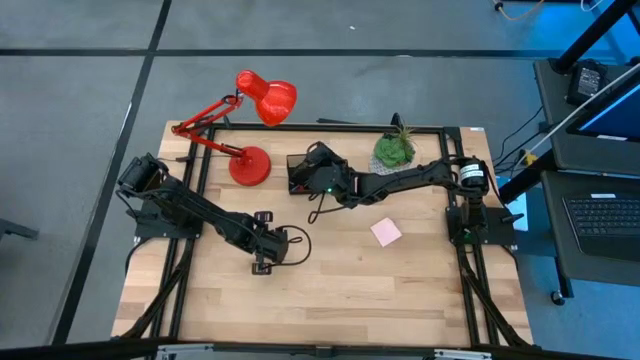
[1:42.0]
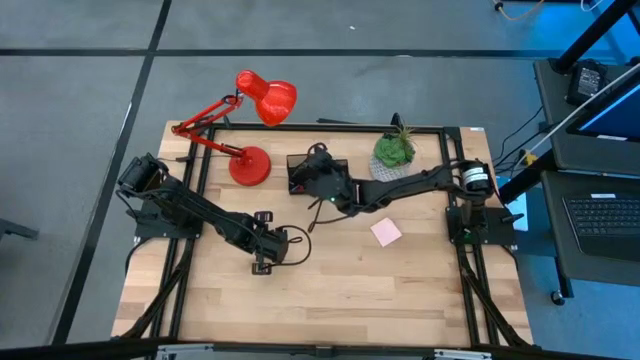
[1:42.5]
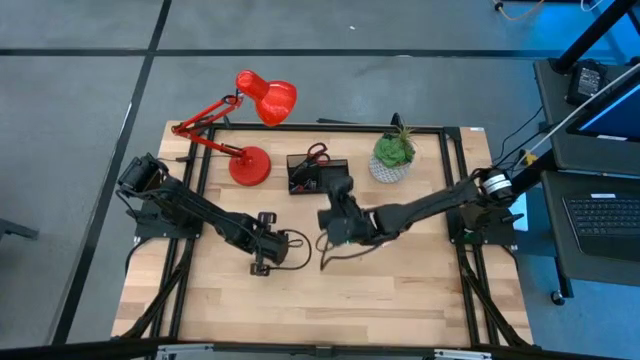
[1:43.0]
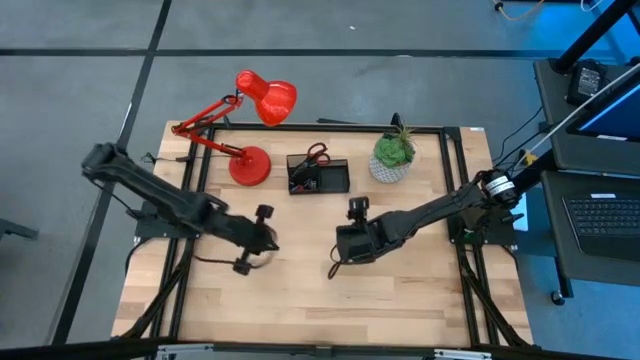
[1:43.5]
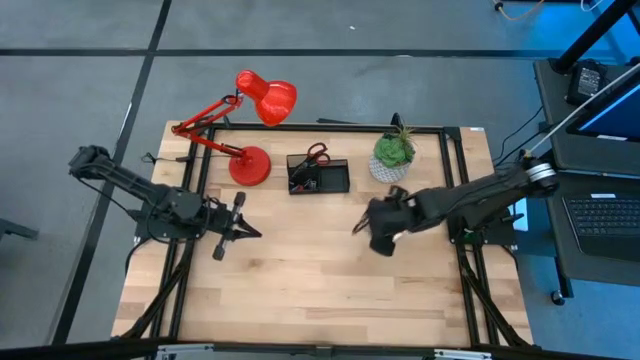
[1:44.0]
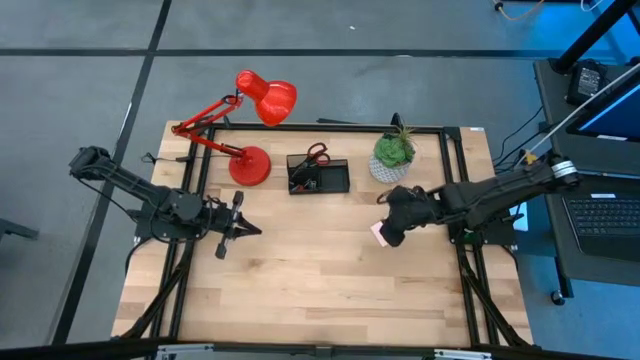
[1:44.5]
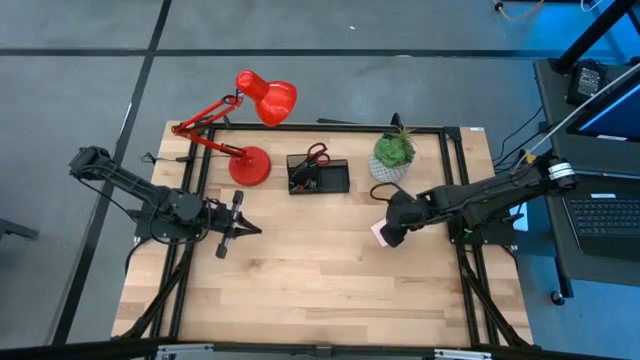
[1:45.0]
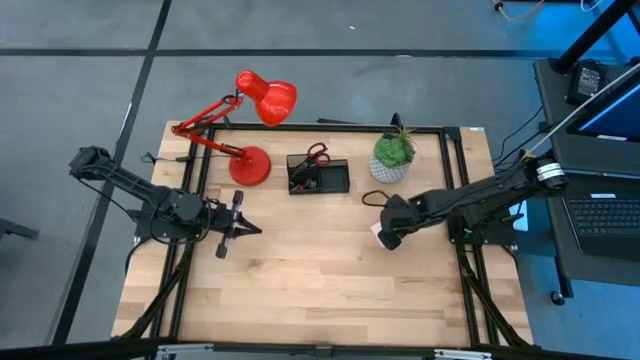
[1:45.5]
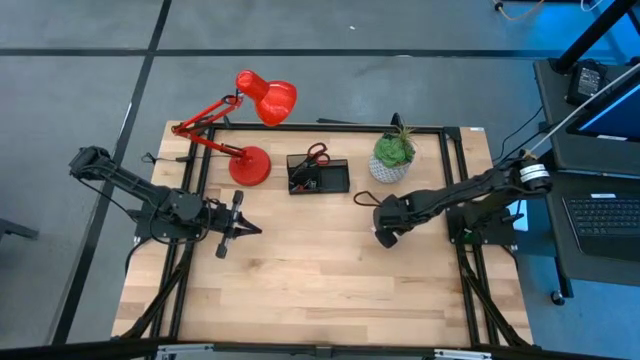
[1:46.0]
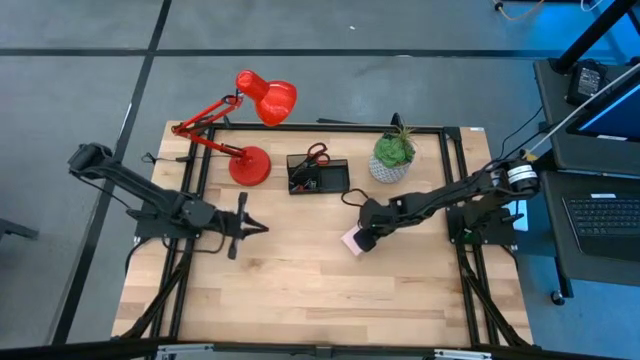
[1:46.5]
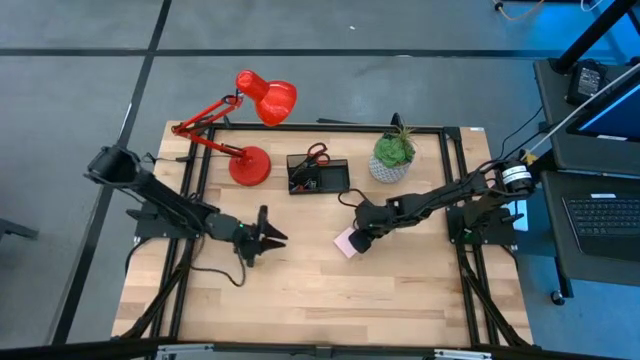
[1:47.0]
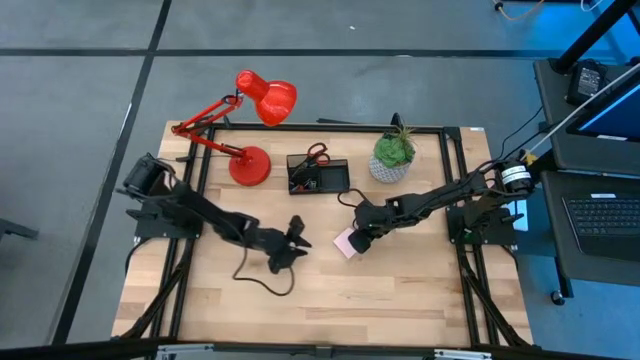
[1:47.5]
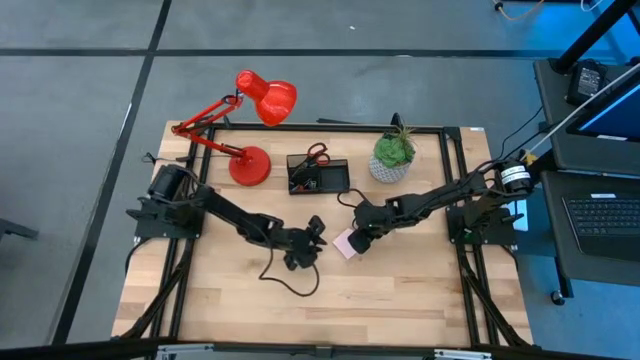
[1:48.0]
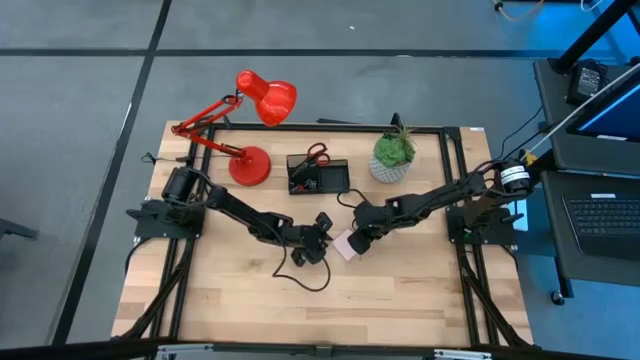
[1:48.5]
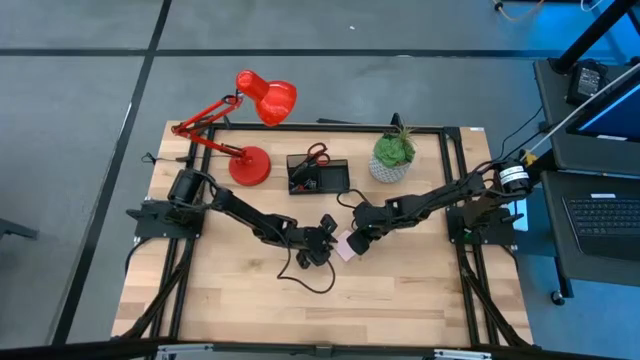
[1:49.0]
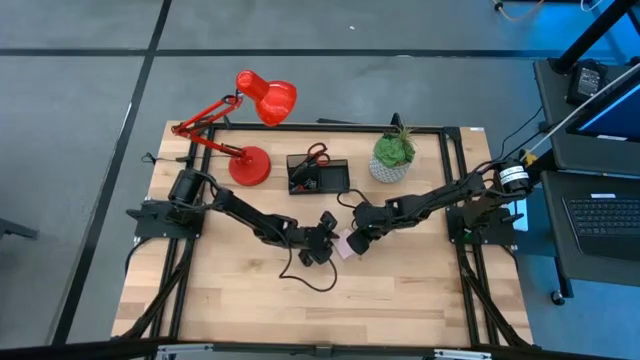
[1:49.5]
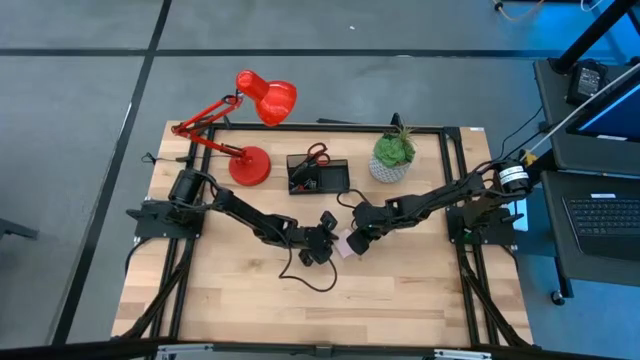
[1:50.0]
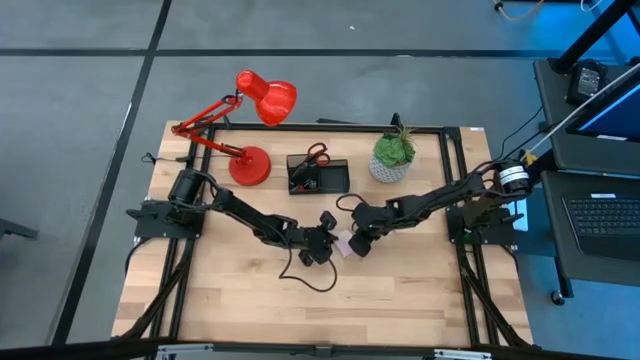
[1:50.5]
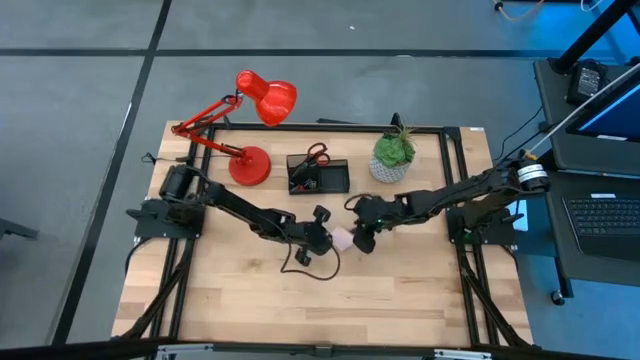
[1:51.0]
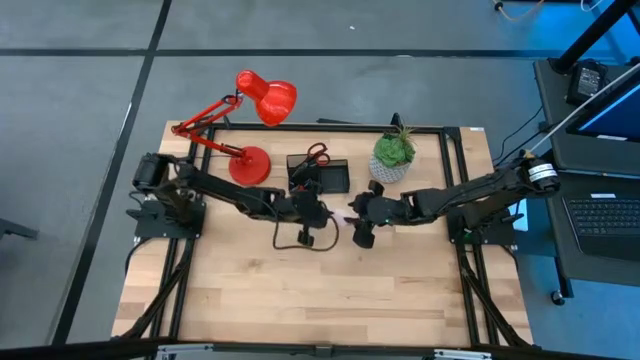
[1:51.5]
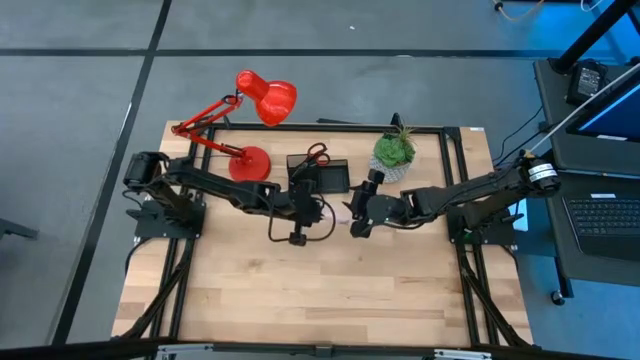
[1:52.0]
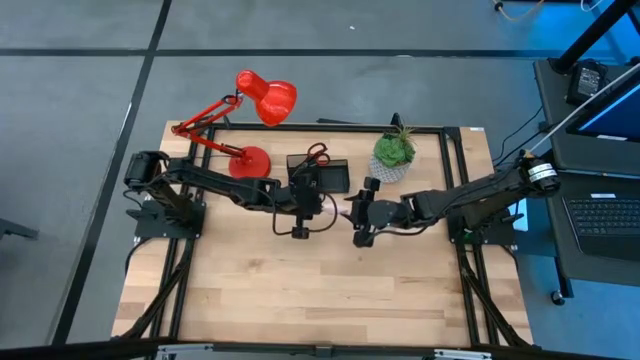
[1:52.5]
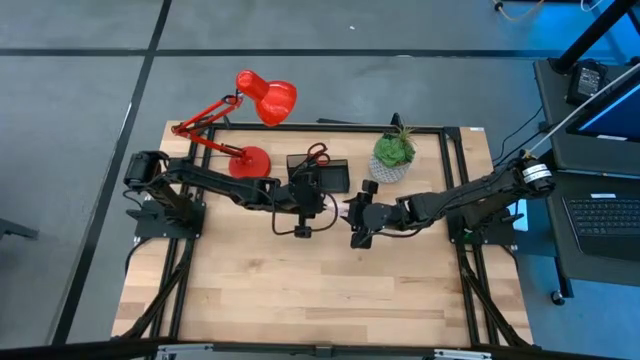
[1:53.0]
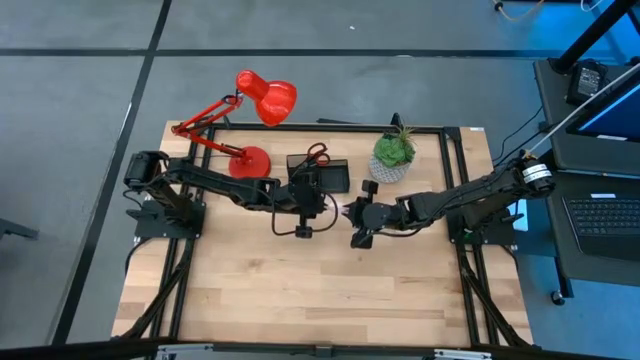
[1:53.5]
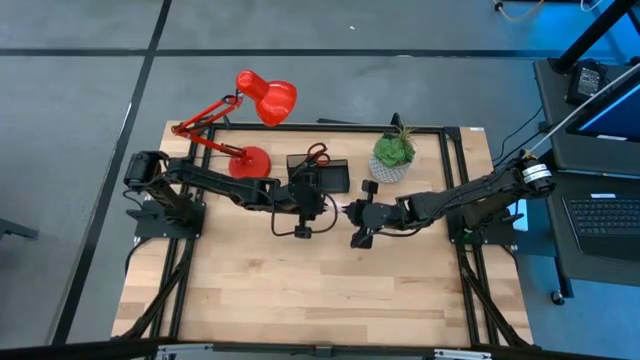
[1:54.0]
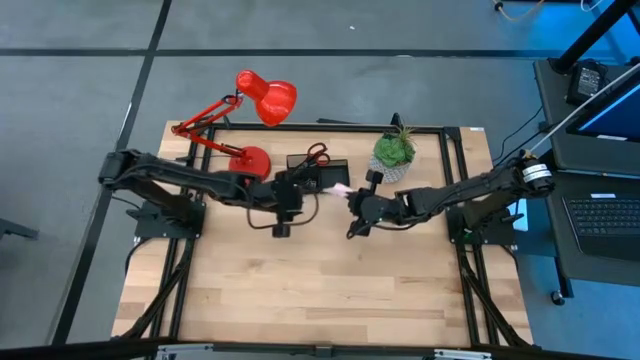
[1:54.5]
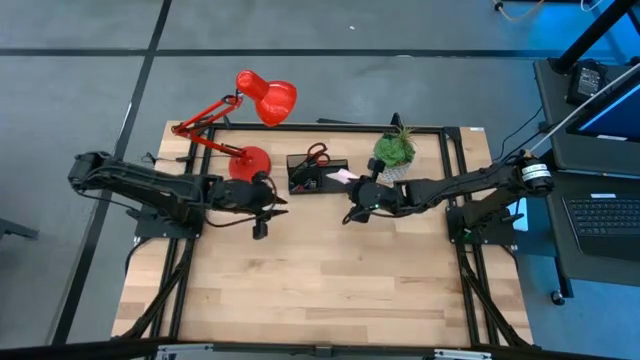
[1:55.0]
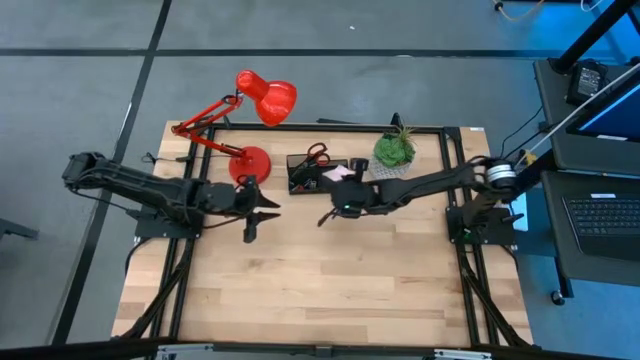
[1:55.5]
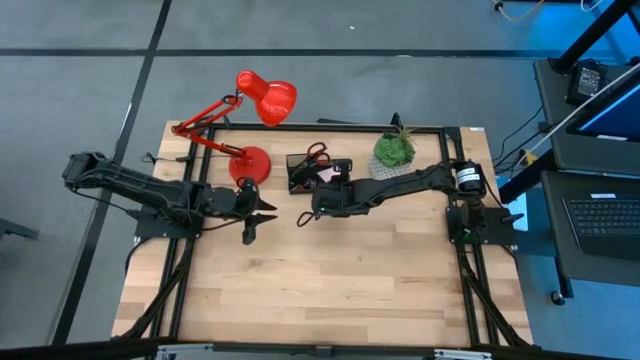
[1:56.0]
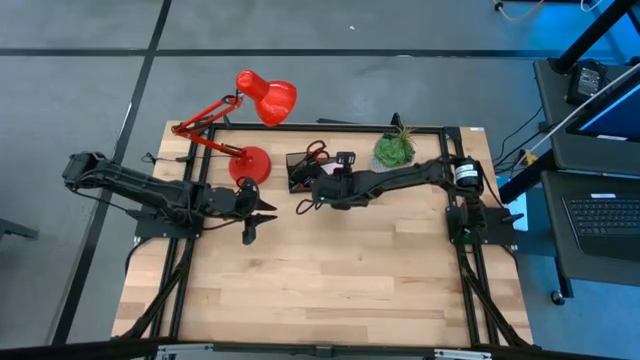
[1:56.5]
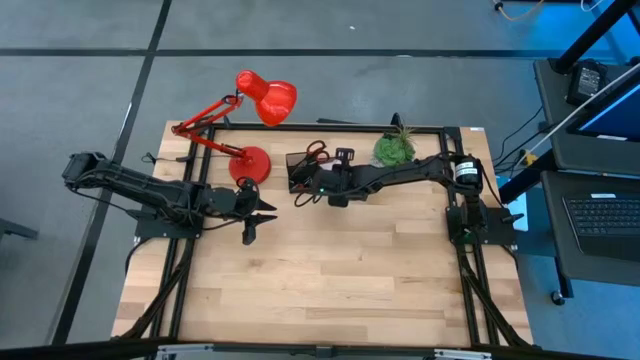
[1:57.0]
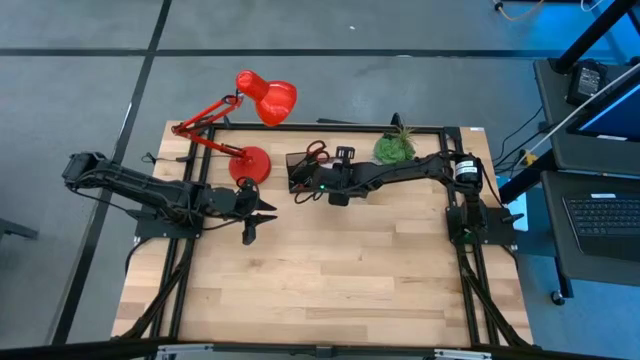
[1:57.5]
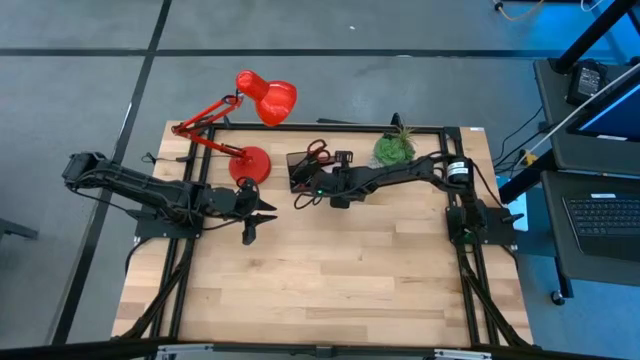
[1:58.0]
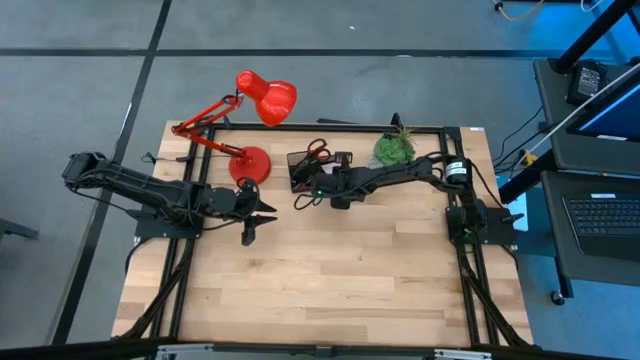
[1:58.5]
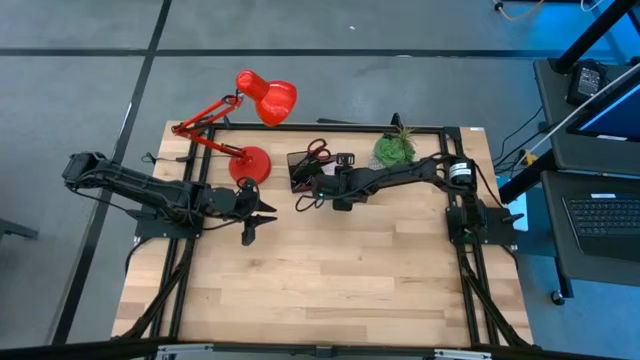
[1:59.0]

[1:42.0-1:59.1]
Task: Pick and place office supplies into organizer
Put the sticky note into the desk organizer

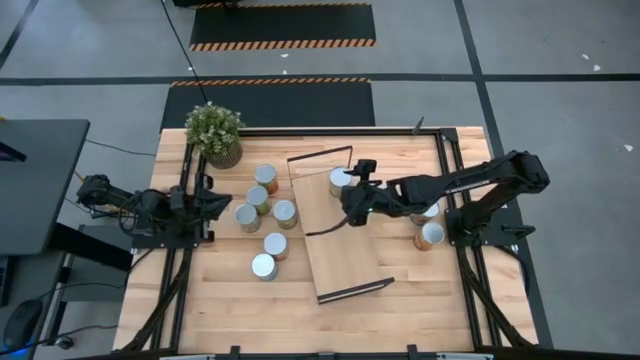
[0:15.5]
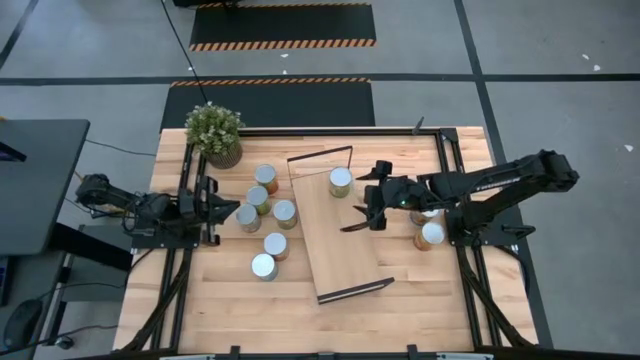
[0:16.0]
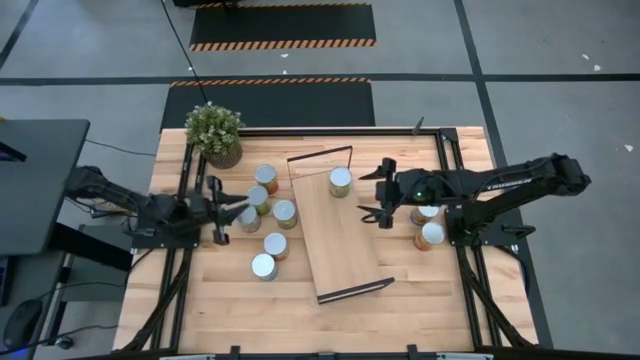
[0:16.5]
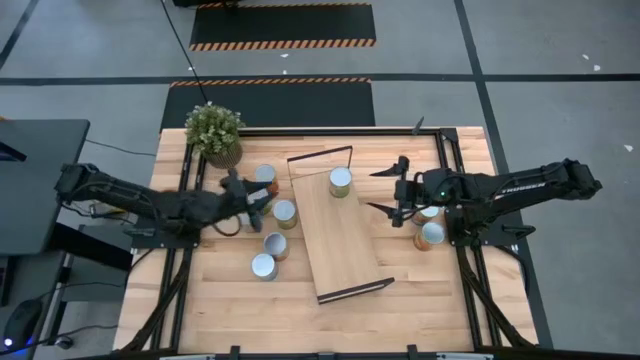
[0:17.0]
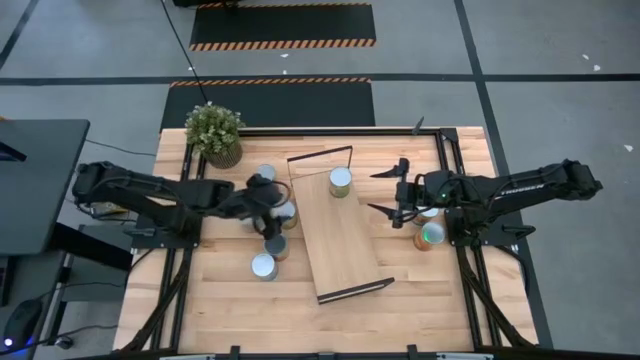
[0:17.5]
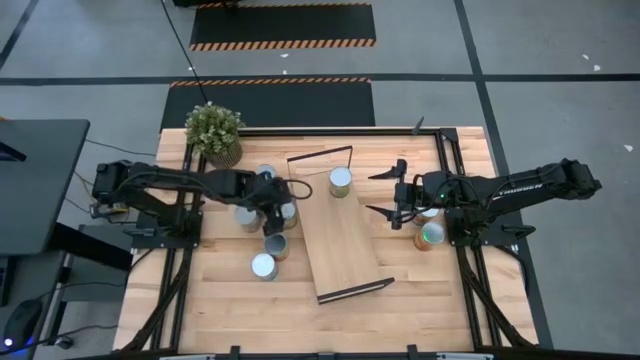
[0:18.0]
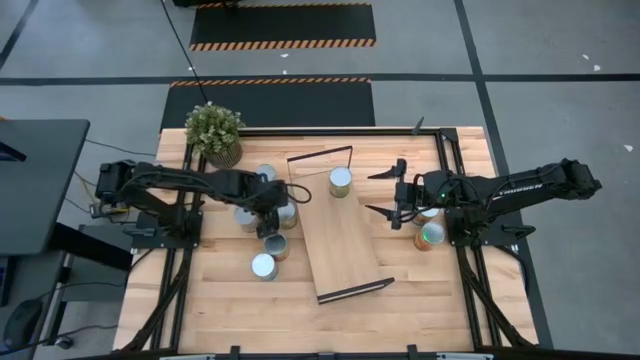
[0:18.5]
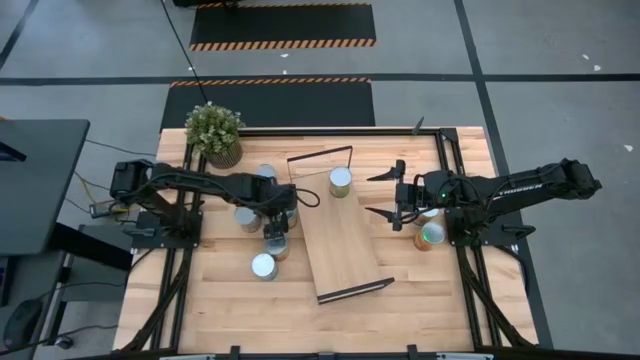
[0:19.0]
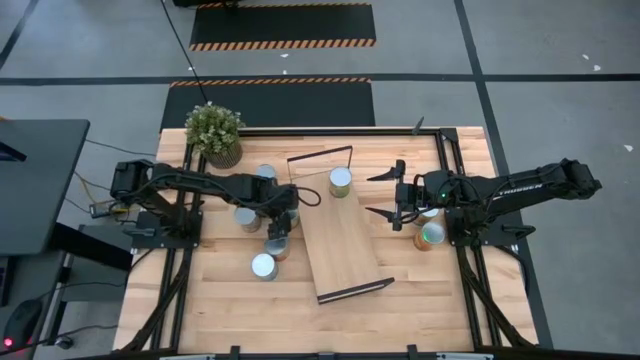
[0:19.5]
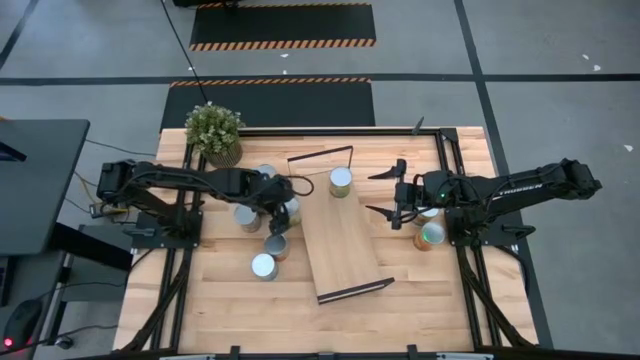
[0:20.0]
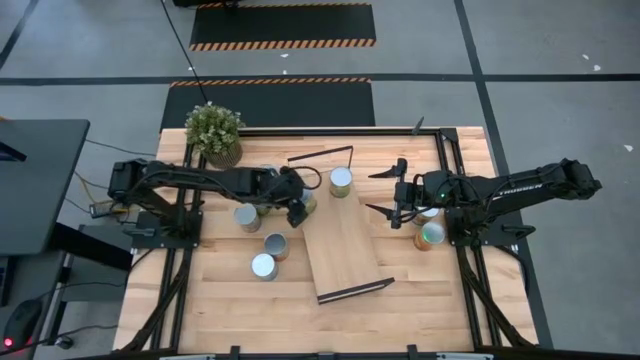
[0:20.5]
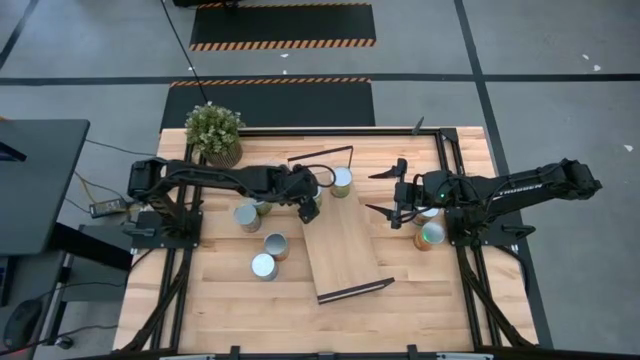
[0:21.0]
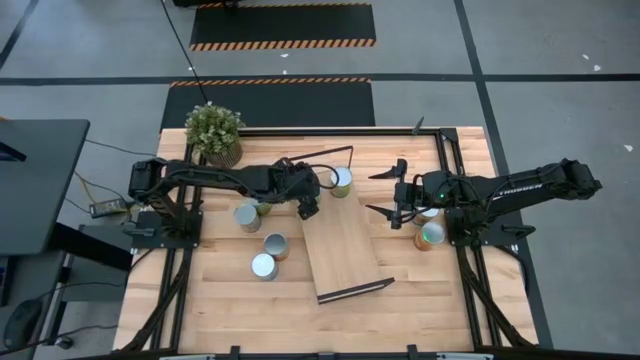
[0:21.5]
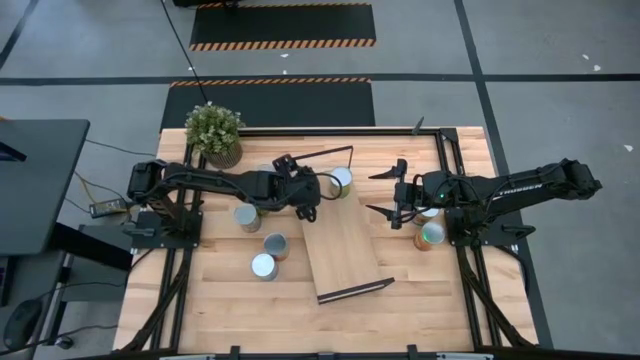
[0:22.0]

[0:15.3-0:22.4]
Task: Pick and place cans onto a shelf
Put the canned oranges on the shelf
